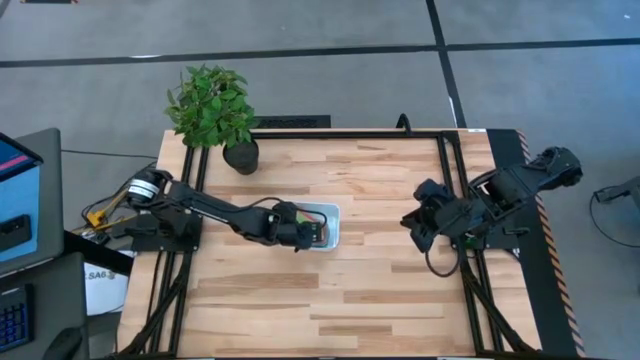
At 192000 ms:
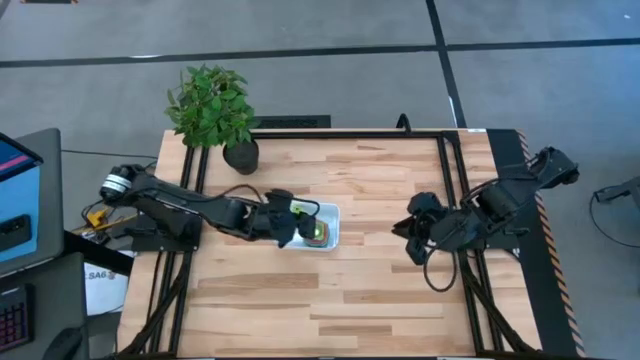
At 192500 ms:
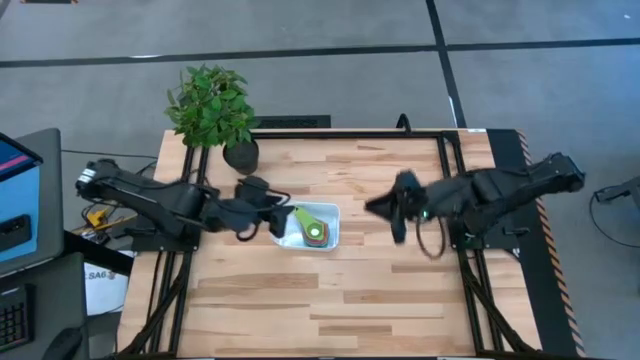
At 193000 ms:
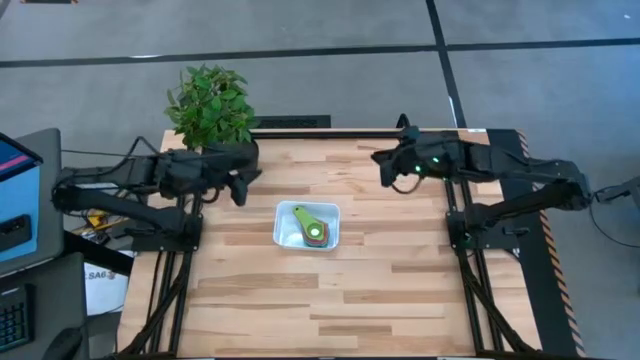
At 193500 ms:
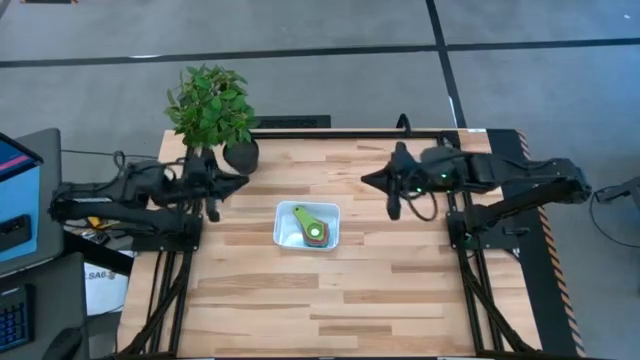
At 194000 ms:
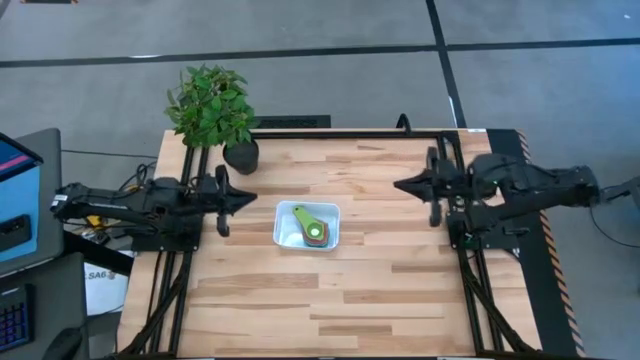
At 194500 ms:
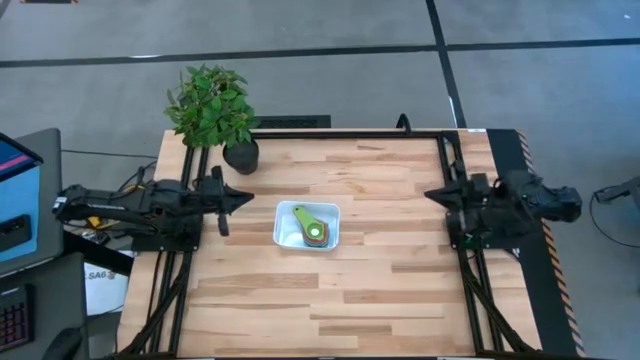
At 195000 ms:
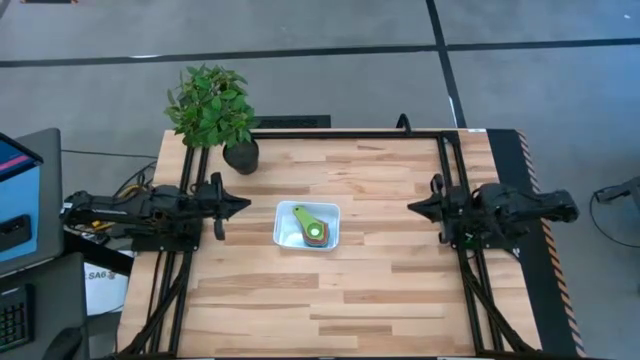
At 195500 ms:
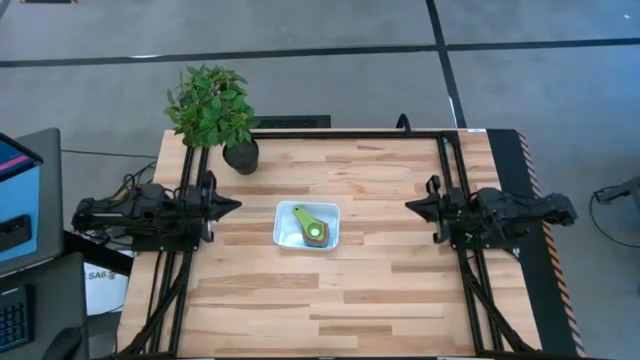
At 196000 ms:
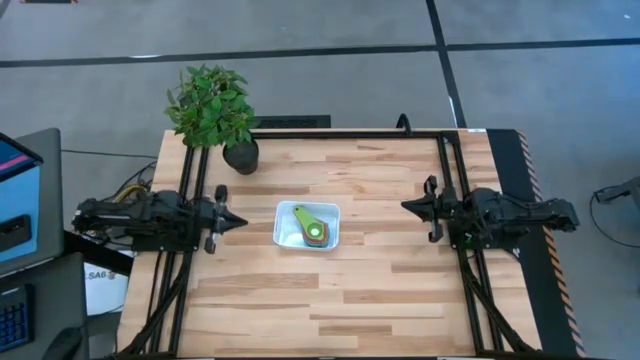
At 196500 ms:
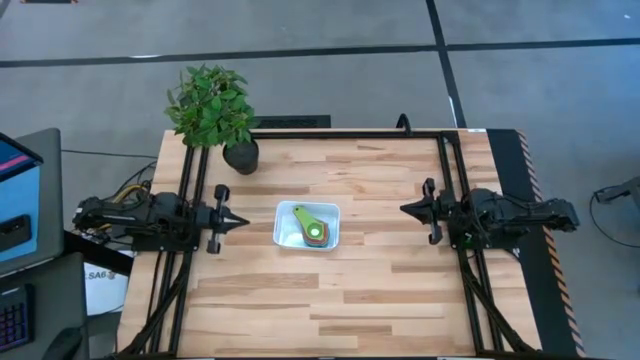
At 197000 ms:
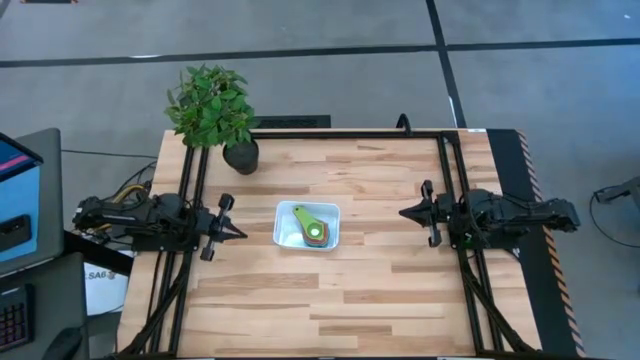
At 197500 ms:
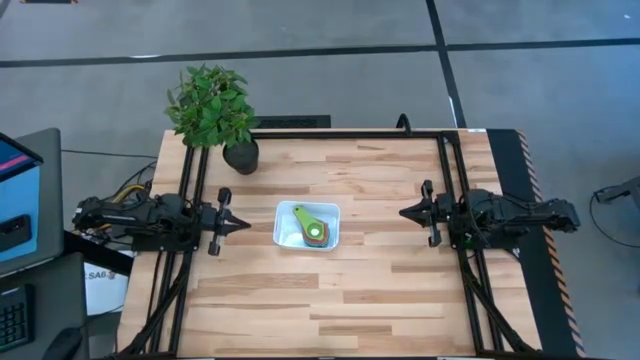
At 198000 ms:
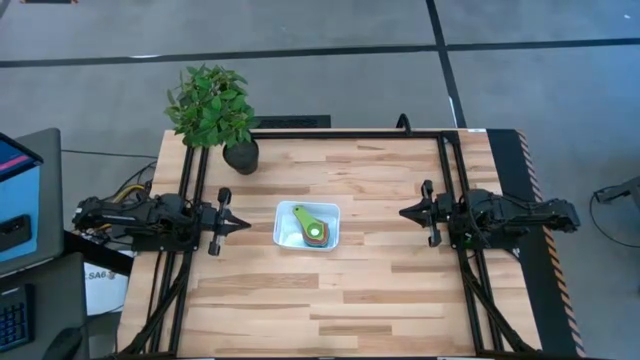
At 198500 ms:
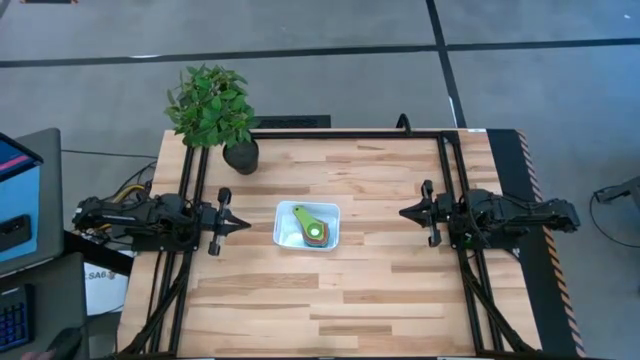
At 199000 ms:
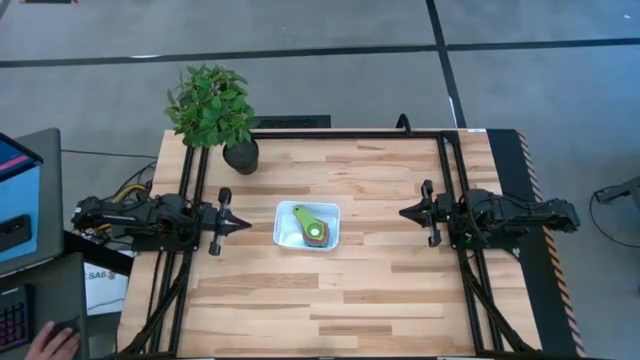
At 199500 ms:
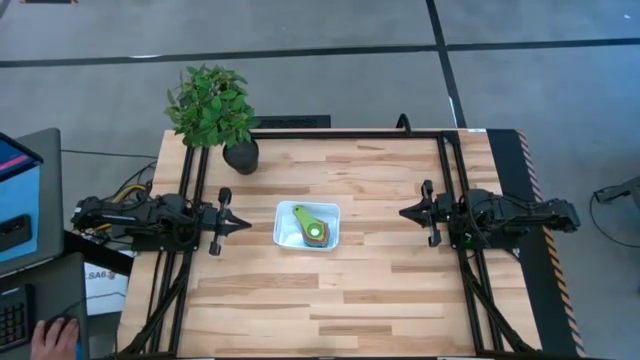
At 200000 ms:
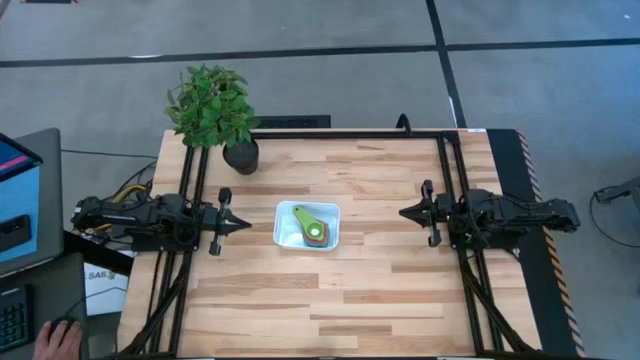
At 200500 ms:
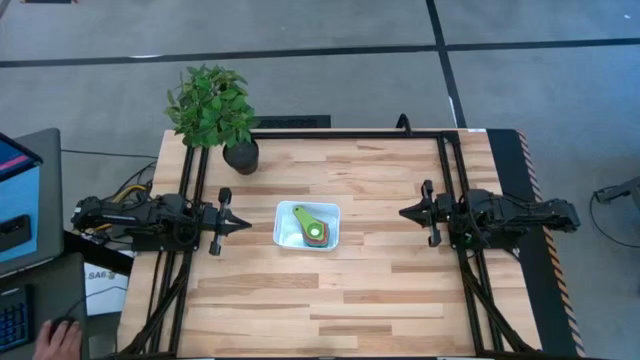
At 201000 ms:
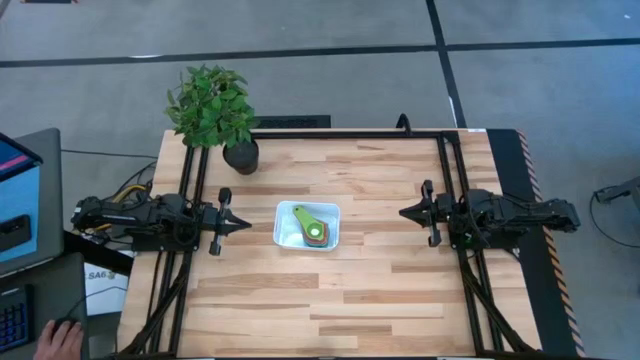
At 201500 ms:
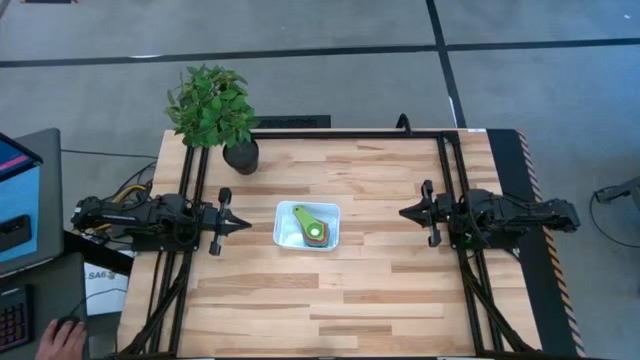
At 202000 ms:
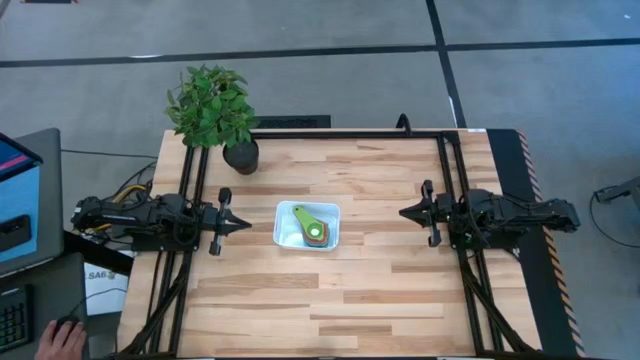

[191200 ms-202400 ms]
Task: Nest measuring cups in basket
Return to Home Position

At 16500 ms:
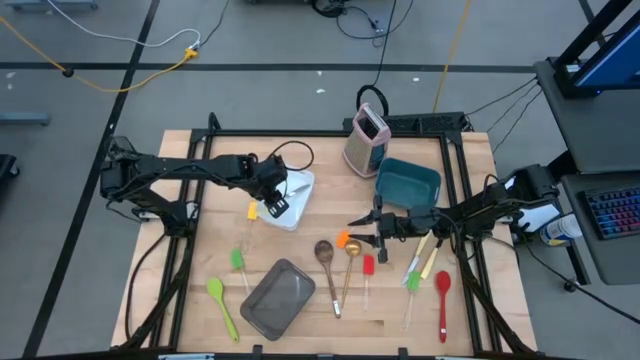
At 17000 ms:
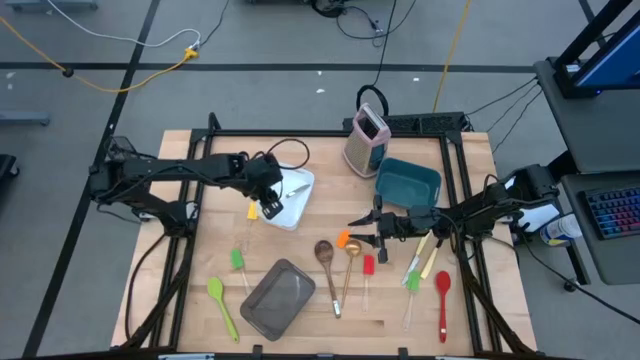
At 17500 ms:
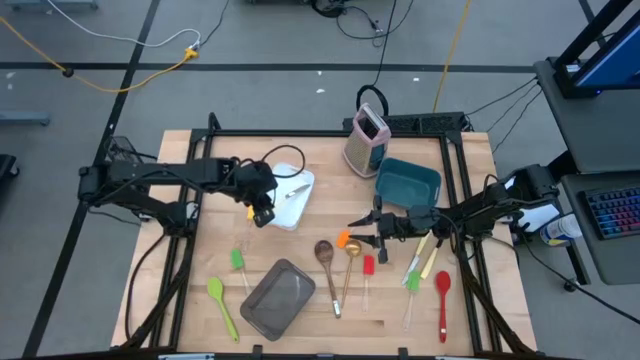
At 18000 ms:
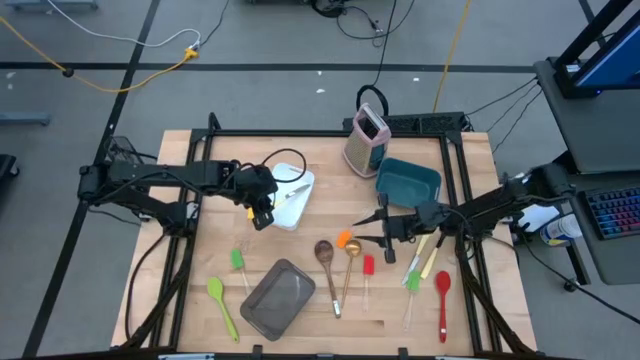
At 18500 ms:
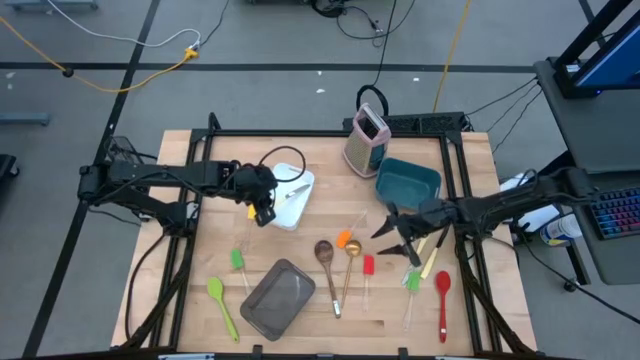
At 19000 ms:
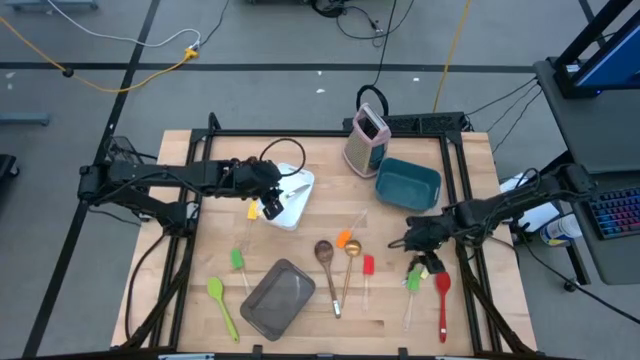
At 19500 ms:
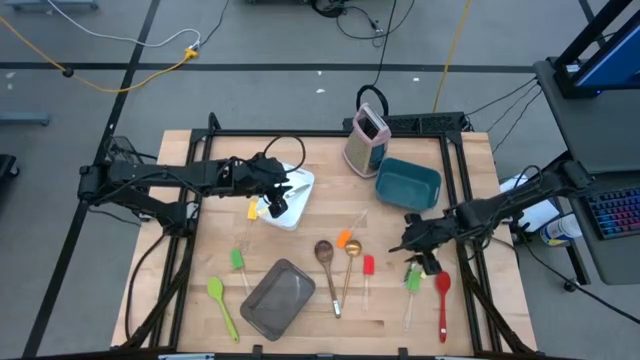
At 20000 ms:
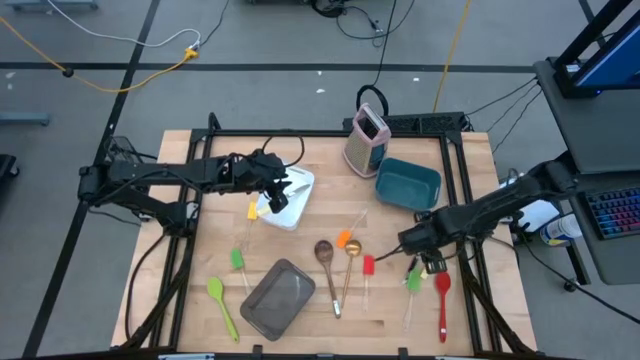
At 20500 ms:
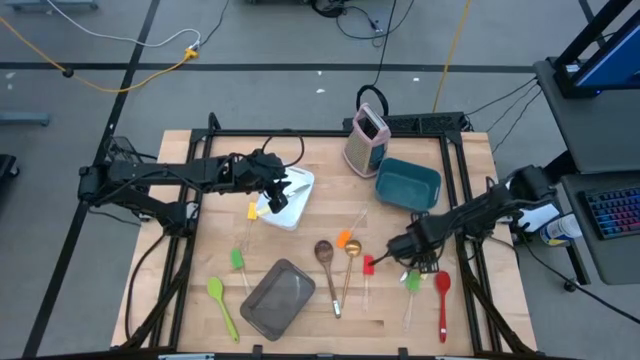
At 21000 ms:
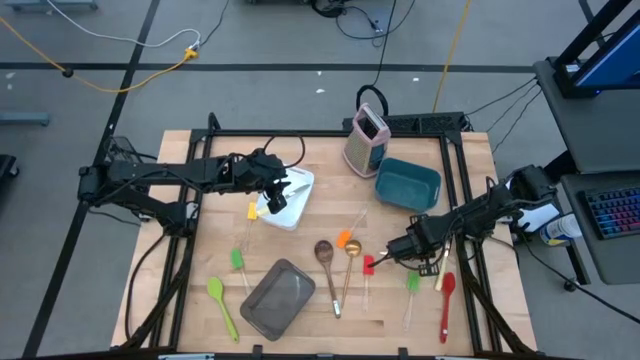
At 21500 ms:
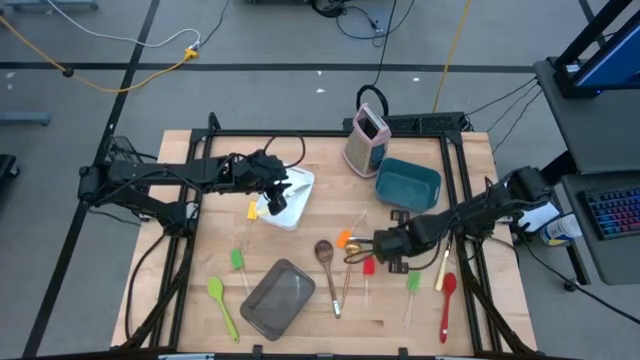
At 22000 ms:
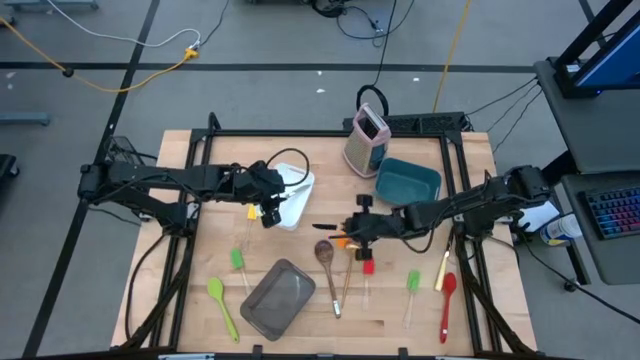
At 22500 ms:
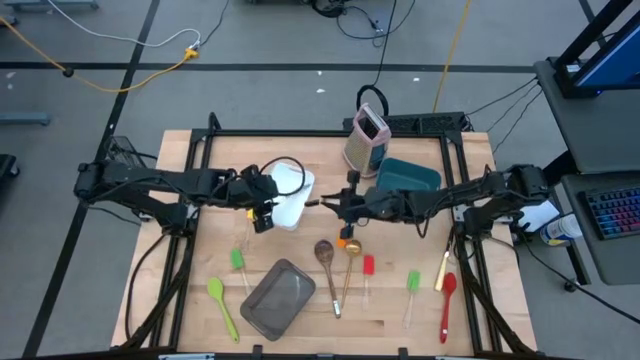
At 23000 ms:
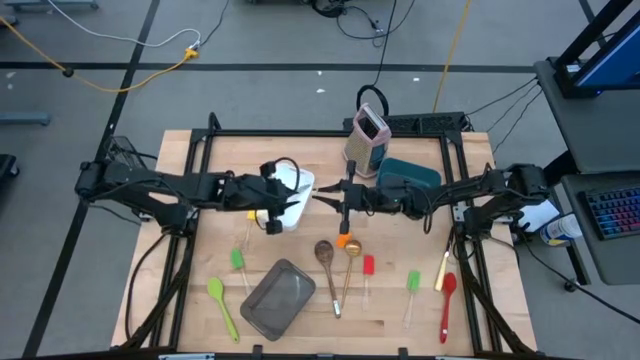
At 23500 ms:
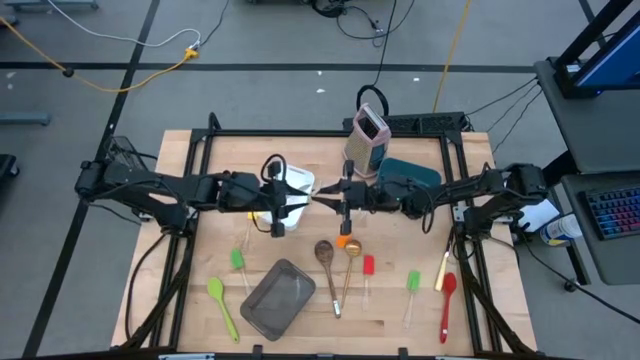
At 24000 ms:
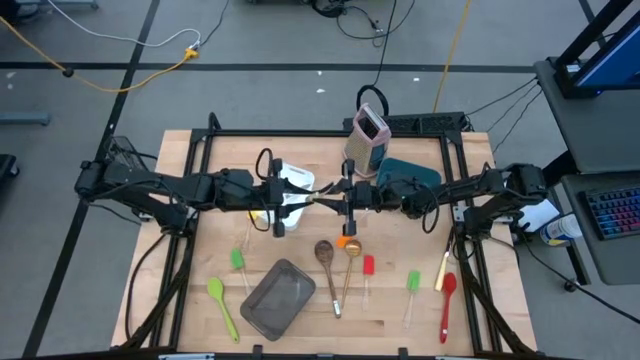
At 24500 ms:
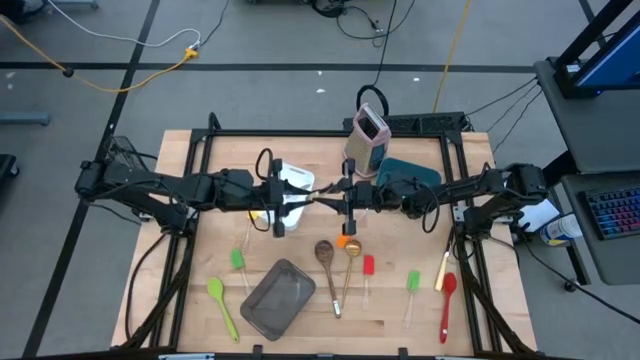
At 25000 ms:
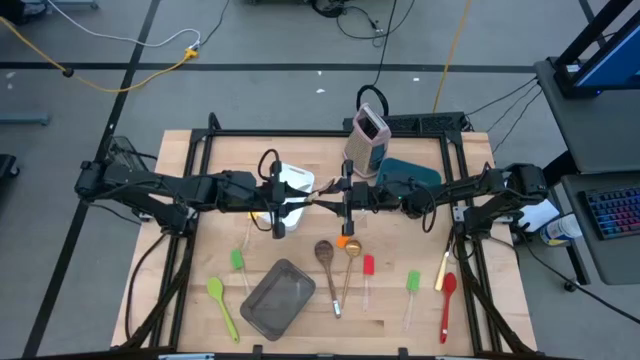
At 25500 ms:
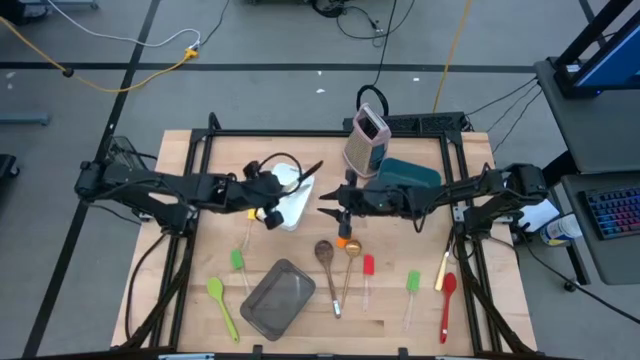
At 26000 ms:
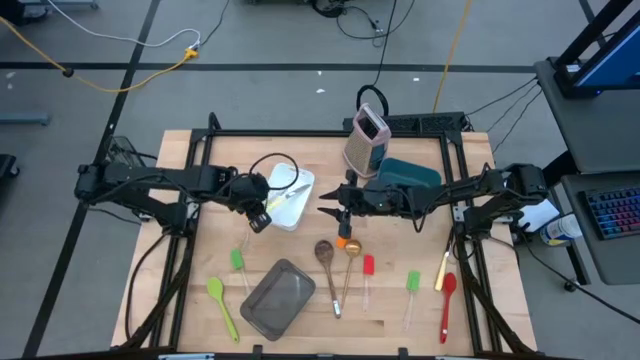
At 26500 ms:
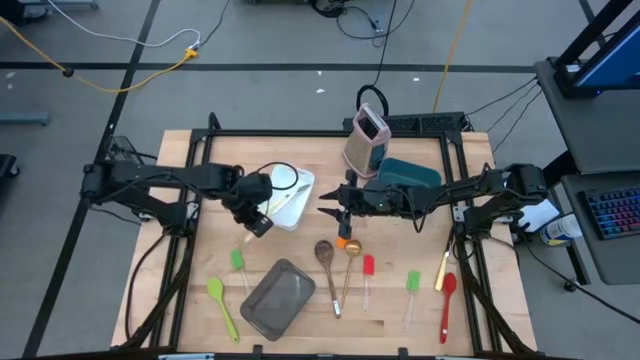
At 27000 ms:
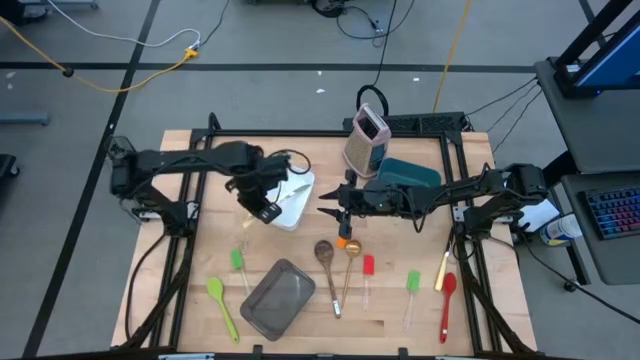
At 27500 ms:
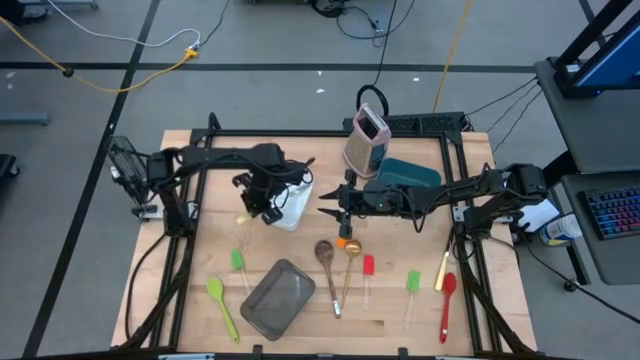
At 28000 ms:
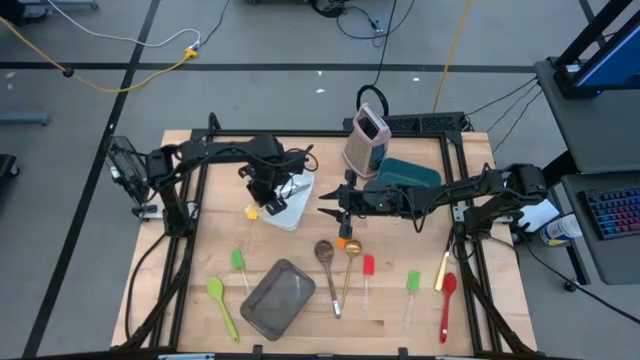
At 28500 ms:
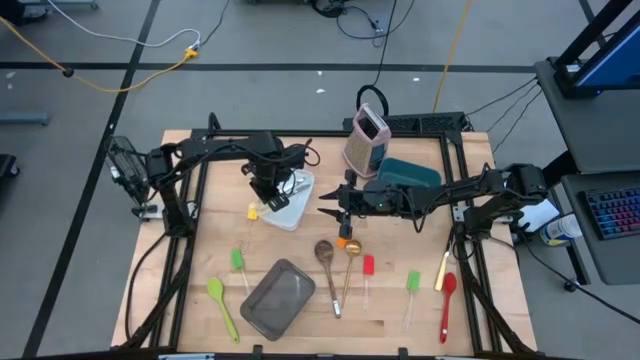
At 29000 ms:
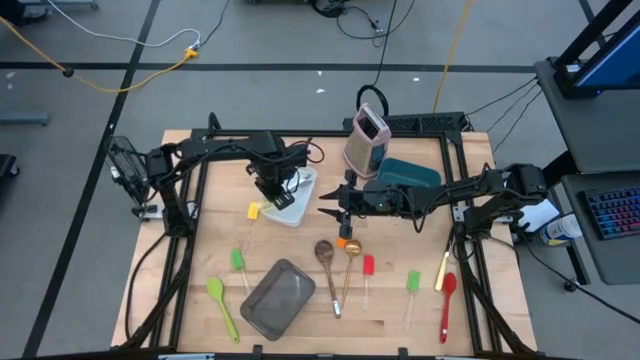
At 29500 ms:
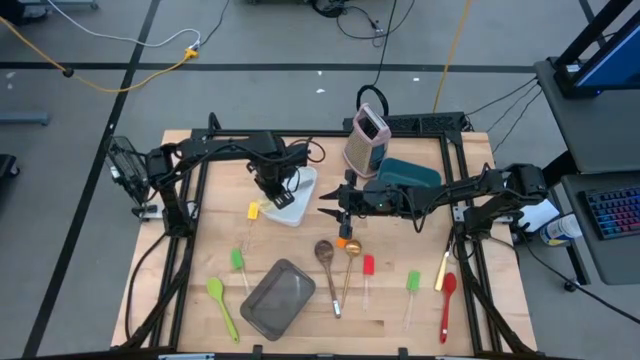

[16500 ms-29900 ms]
Task: Pick & Place Kitchen Items
Put the left white table knife into the white bin
